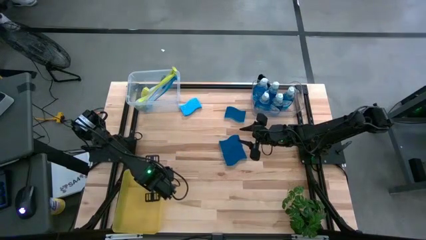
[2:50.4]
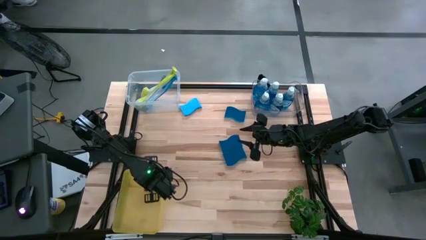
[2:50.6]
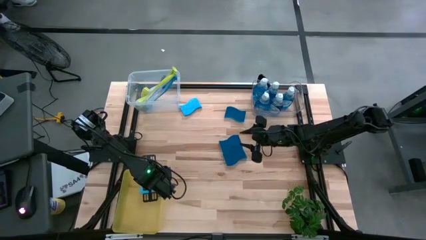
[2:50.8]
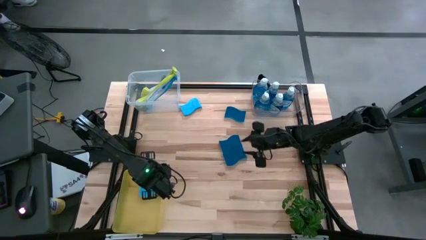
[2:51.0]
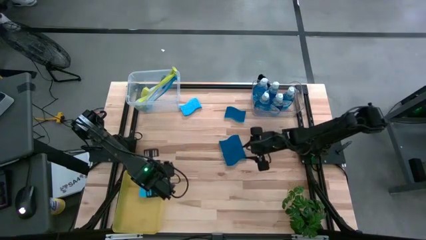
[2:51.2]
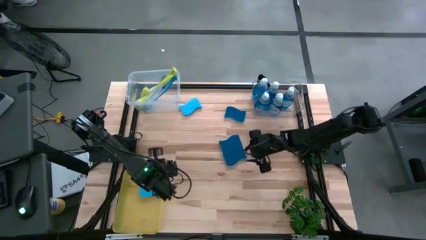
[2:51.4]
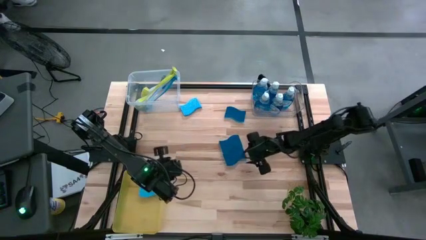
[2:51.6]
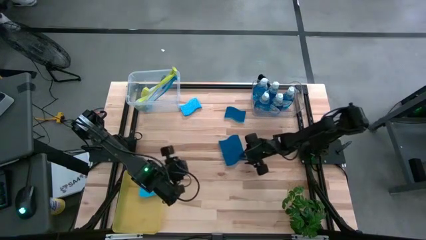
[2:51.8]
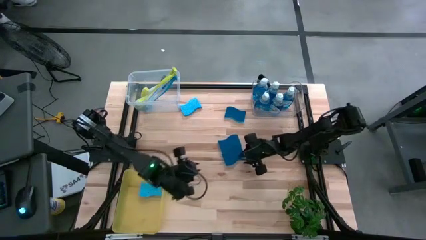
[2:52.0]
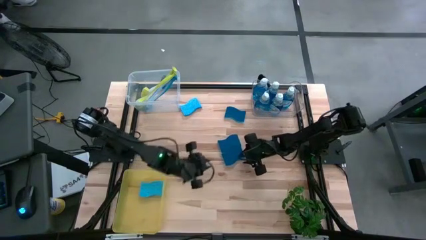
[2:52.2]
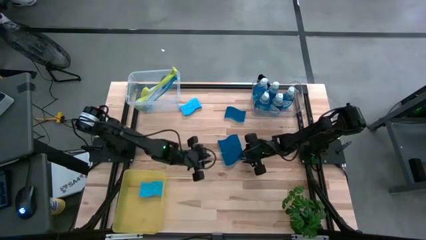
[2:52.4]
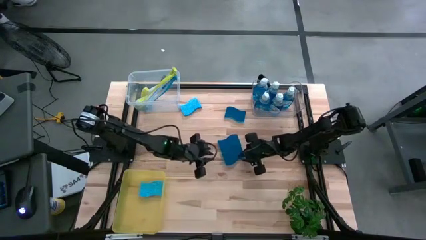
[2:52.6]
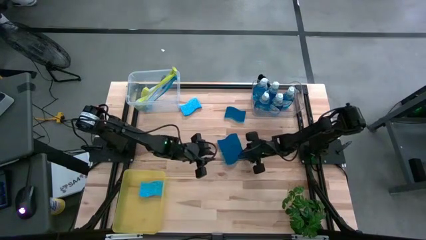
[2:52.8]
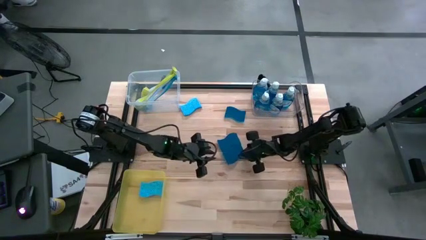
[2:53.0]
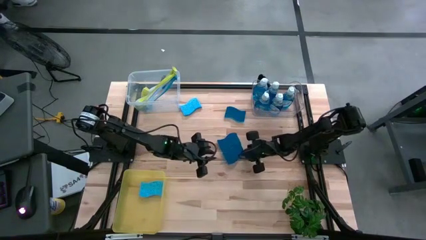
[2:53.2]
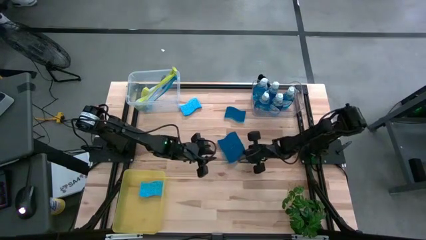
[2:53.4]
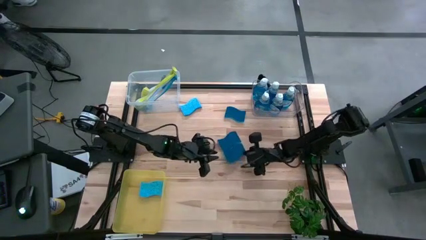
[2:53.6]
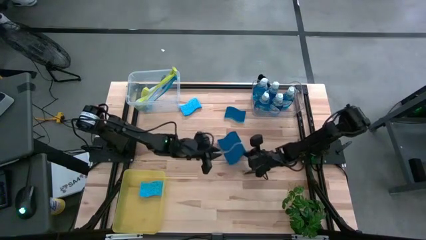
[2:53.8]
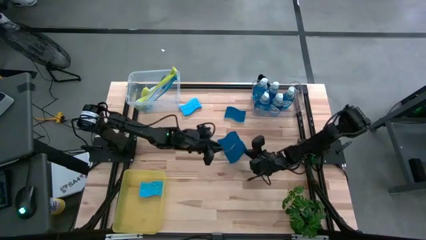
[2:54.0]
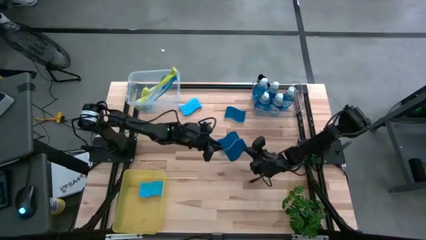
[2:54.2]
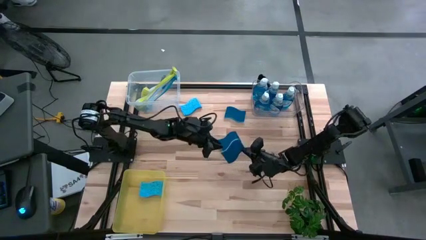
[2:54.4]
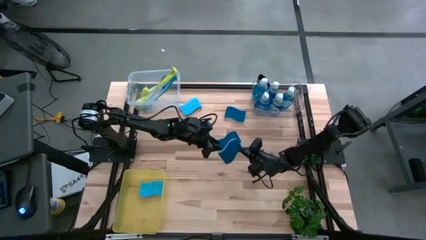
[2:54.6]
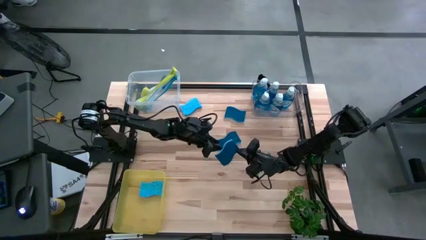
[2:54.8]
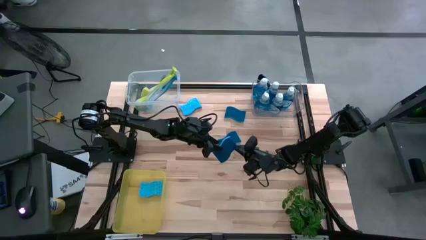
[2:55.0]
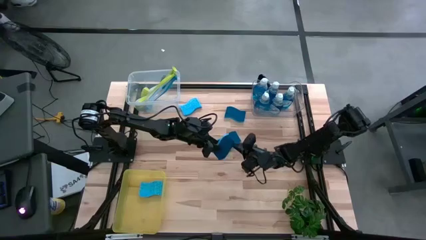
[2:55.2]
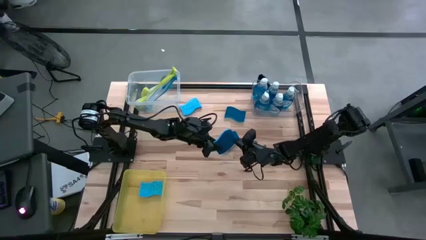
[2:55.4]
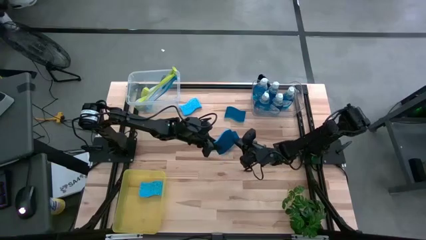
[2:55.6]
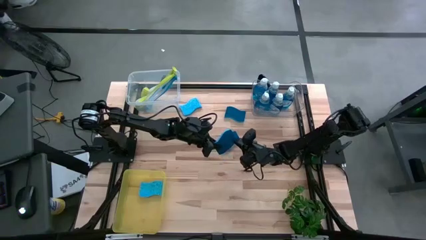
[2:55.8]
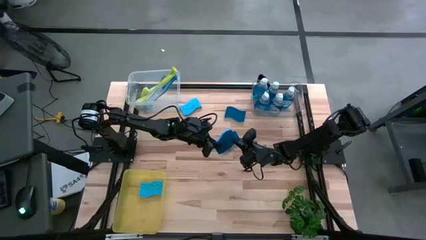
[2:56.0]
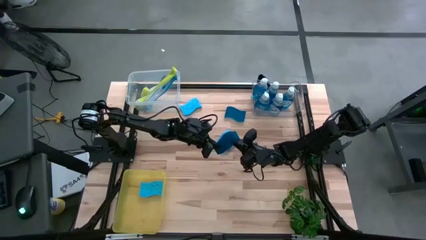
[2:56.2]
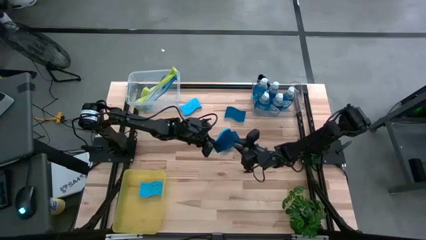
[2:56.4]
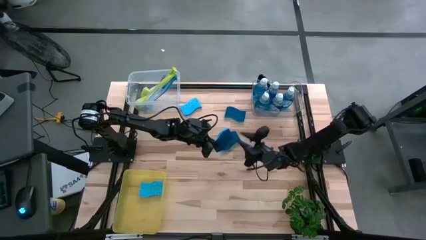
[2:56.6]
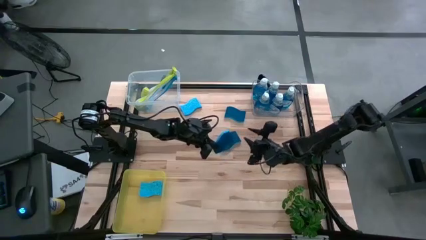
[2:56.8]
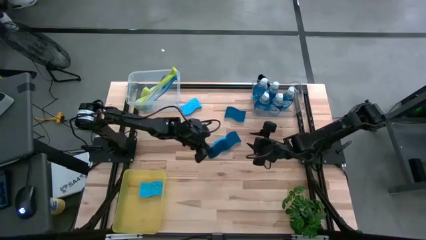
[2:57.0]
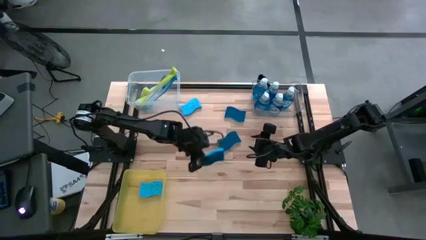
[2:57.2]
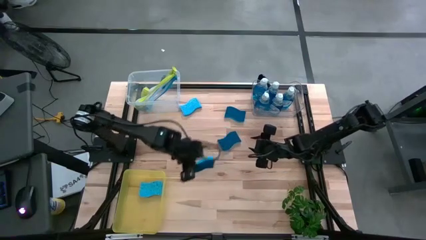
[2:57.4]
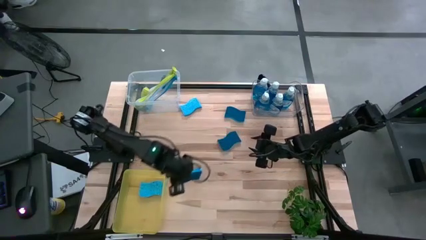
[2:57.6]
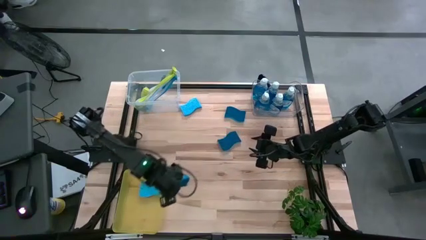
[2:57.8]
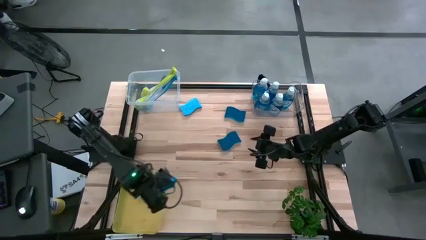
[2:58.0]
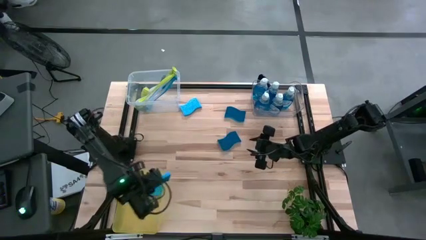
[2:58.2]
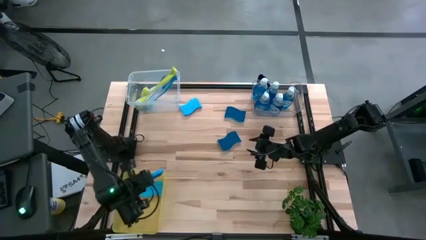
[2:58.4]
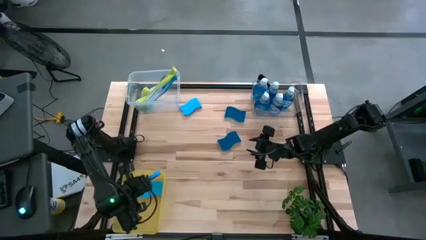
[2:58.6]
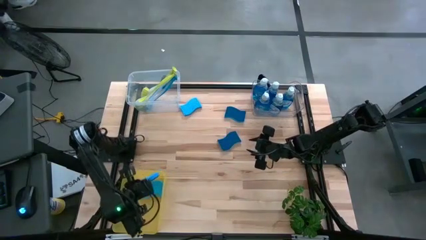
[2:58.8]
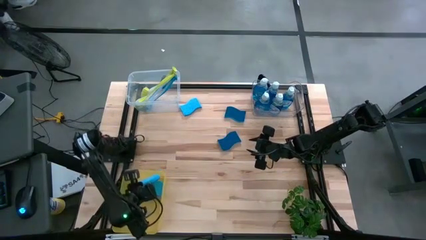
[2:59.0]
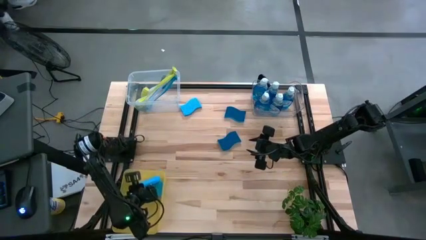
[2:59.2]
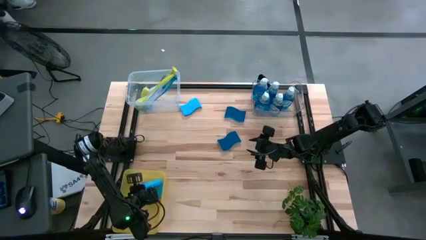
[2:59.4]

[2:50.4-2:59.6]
Task: Pick & Place Kitchen Sink Supplies
Put the bottom sponge into the yellow bin

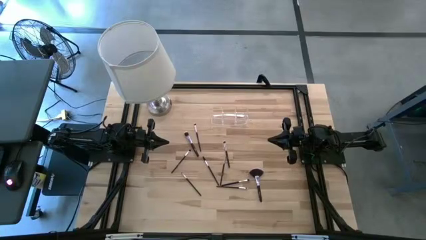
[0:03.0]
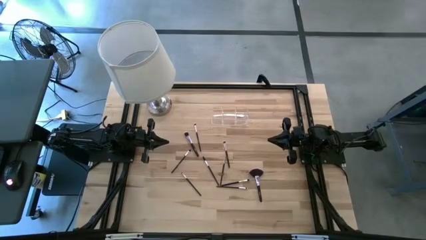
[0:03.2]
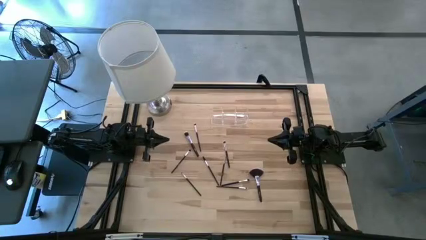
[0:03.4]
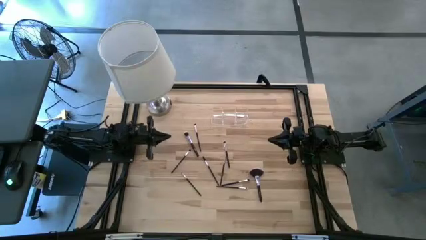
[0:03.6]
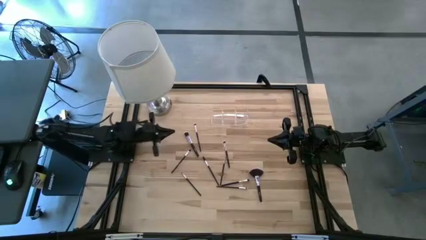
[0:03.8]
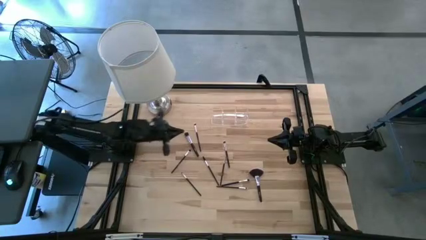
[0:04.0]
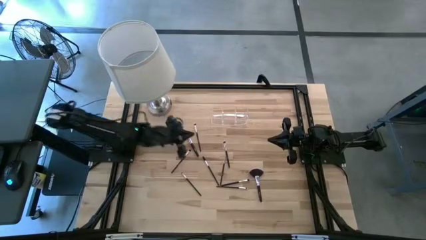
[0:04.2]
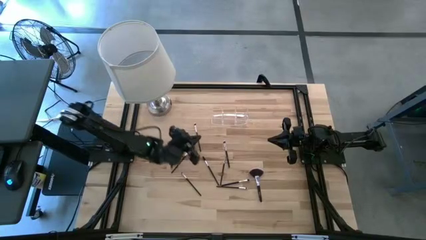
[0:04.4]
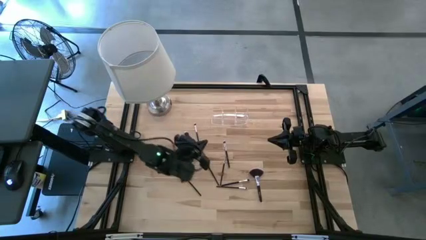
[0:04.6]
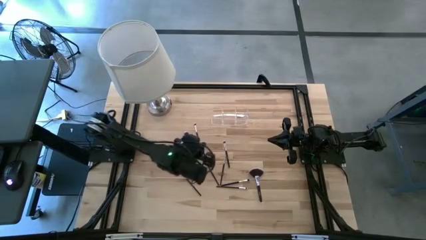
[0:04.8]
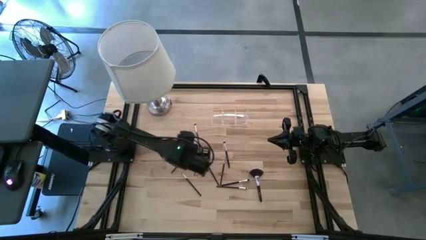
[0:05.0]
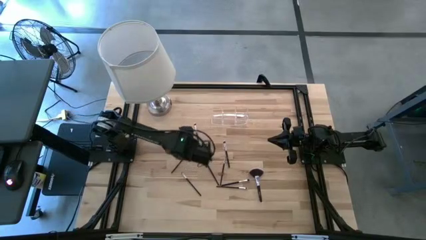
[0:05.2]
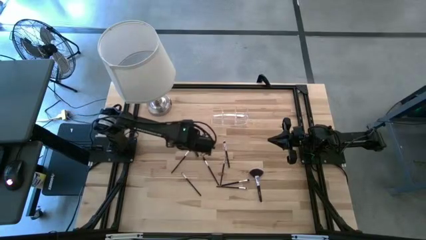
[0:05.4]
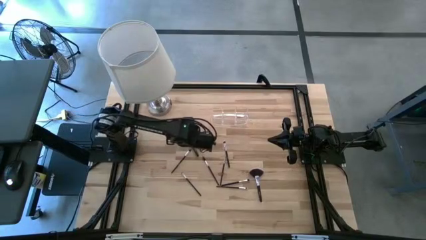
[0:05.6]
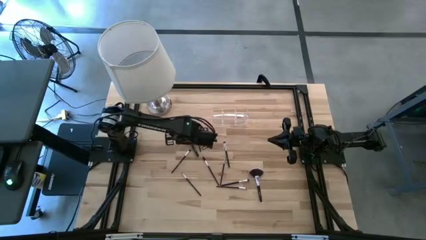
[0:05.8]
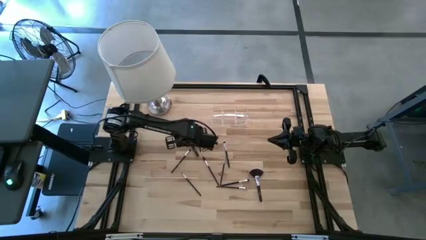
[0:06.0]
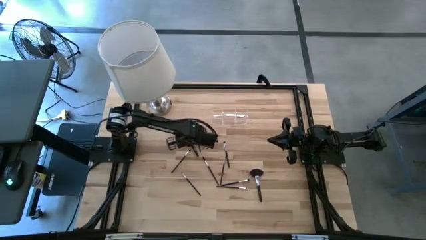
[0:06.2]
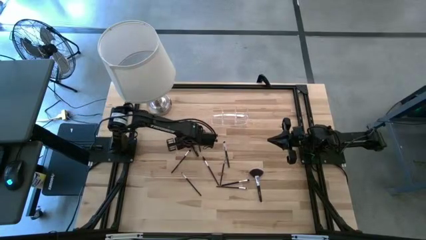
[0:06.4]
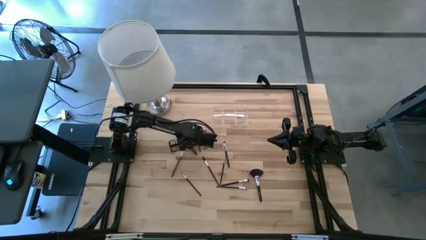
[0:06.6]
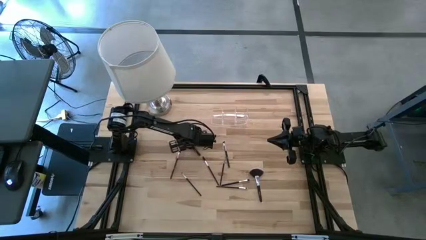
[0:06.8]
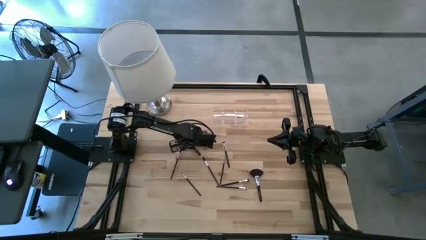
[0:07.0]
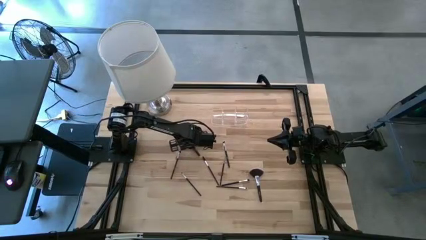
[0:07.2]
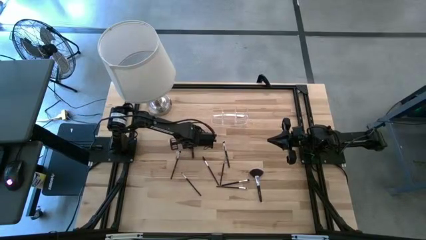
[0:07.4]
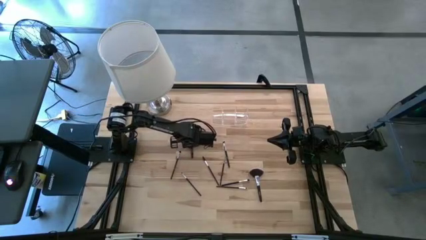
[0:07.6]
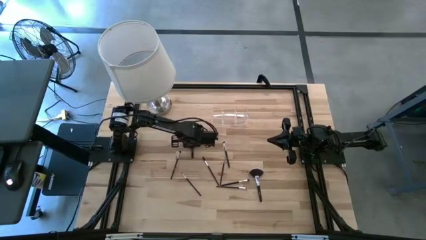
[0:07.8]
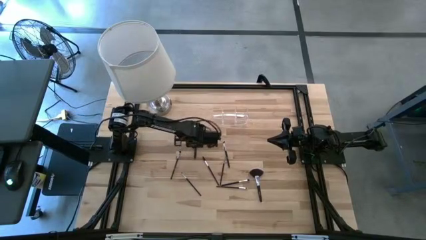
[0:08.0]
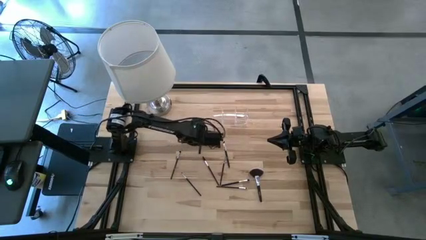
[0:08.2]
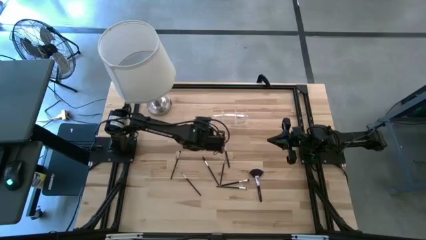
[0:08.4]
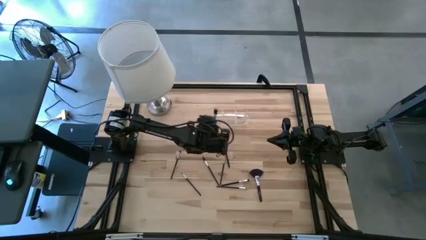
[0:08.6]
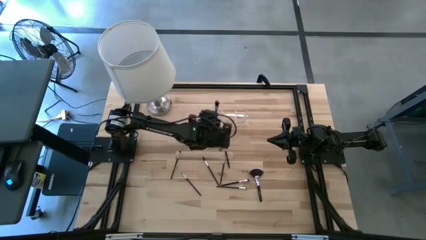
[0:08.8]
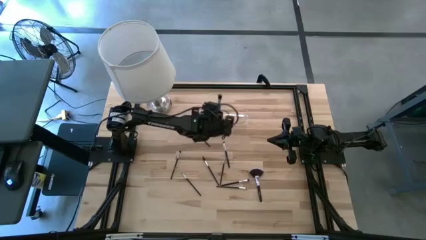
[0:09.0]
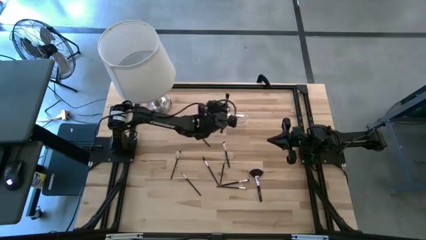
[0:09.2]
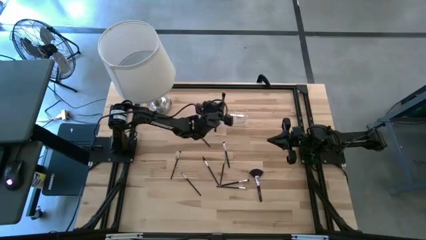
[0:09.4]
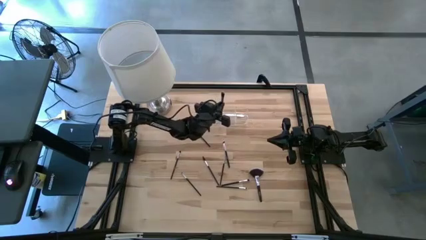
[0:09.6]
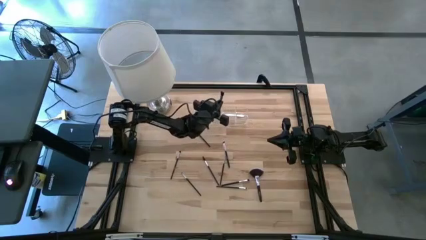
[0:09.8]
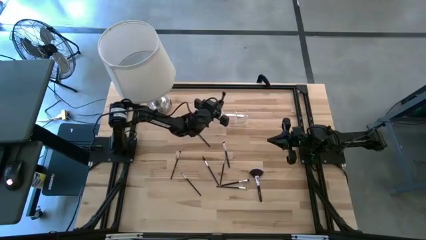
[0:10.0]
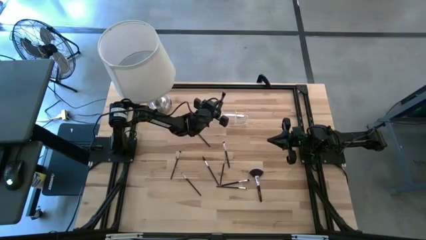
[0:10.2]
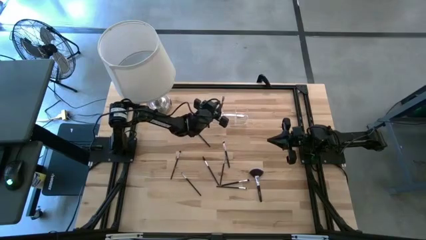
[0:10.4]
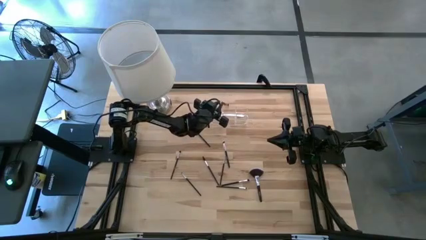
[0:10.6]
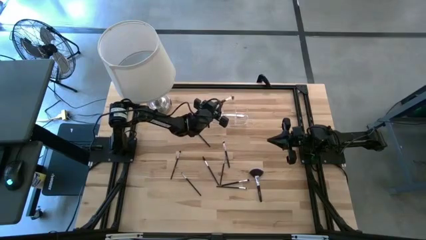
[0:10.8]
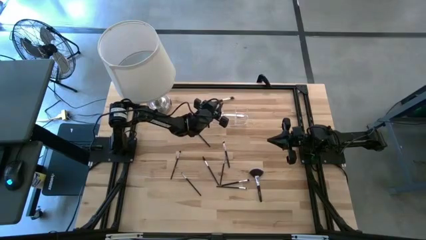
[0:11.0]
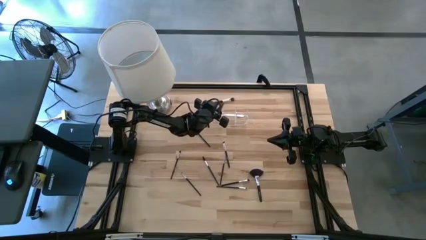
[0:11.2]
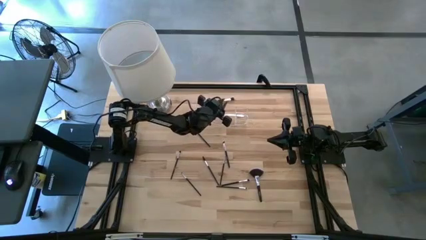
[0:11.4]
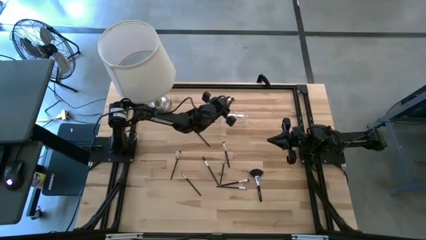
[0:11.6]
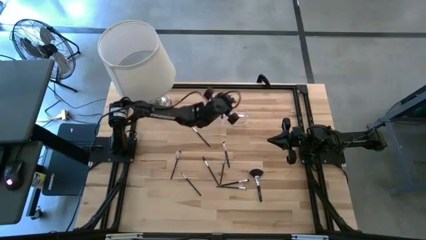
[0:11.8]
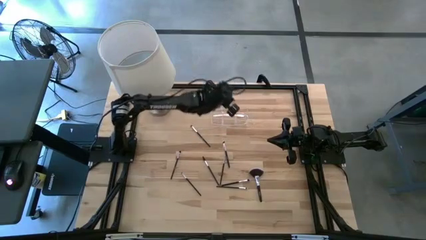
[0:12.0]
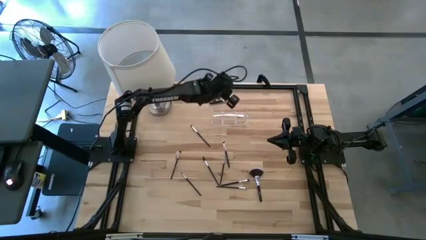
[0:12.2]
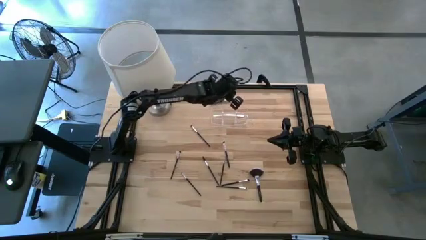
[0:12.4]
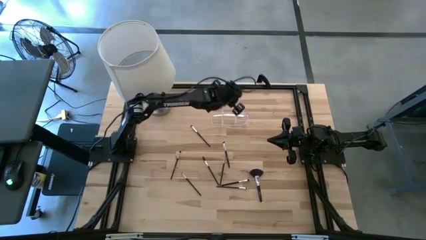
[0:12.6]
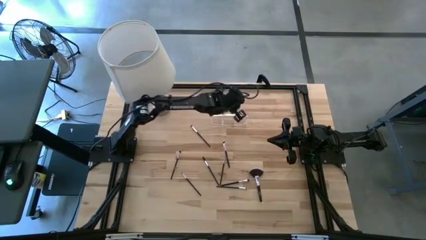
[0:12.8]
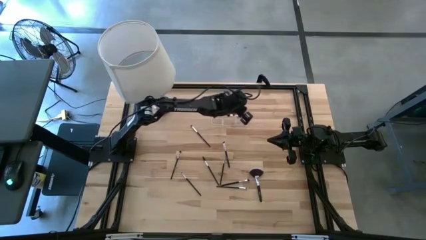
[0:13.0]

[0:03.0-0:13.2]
Task: Put items in baskets/containers
Put the foundation brush into the transparent organizer
